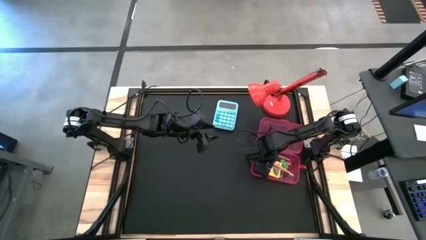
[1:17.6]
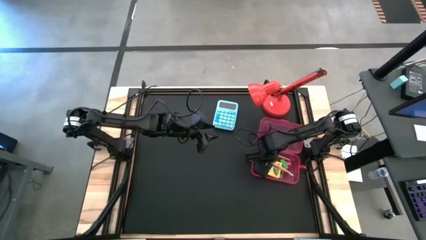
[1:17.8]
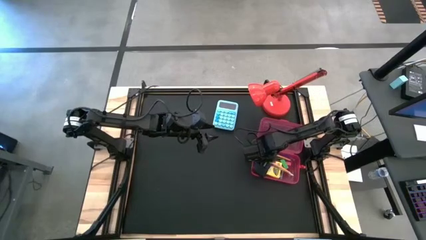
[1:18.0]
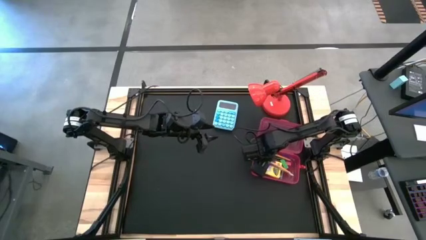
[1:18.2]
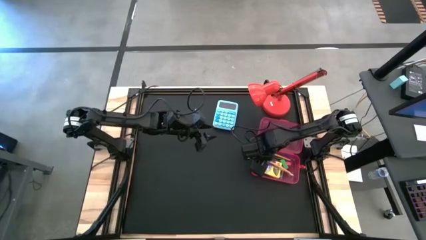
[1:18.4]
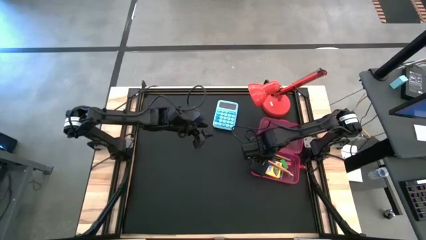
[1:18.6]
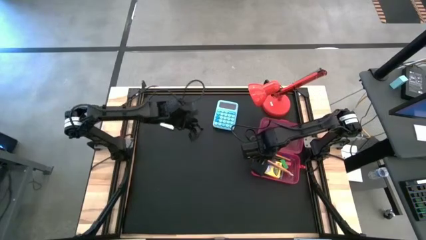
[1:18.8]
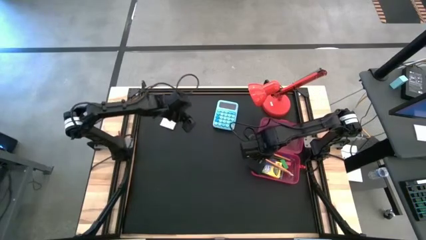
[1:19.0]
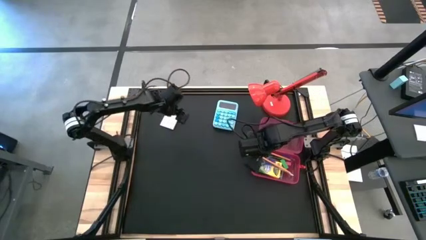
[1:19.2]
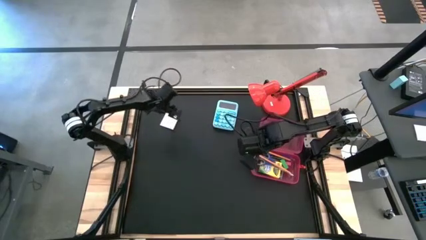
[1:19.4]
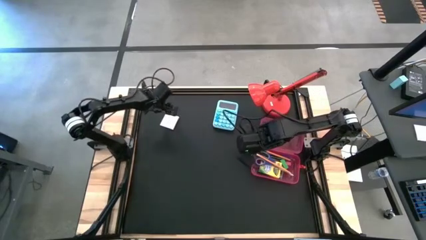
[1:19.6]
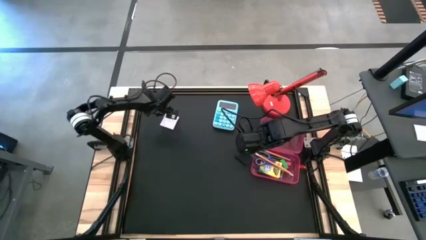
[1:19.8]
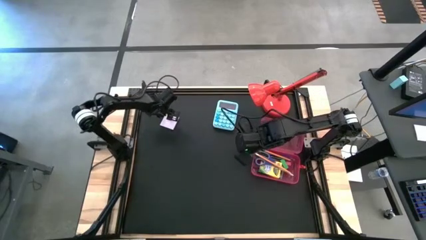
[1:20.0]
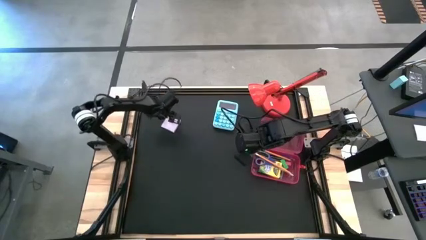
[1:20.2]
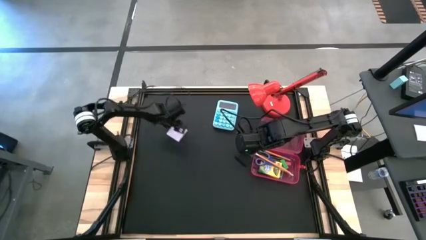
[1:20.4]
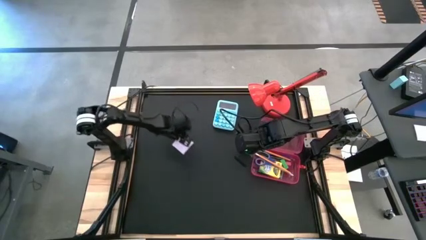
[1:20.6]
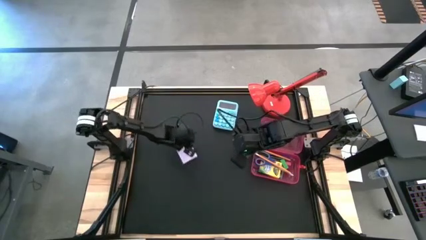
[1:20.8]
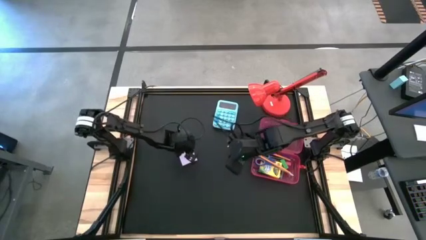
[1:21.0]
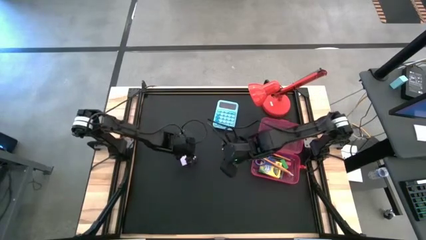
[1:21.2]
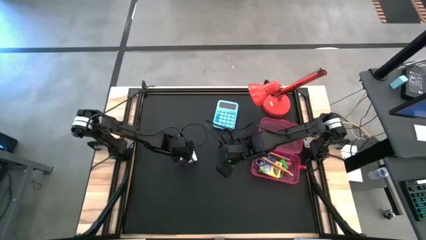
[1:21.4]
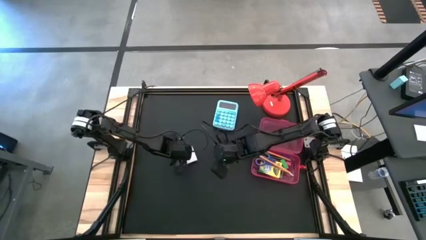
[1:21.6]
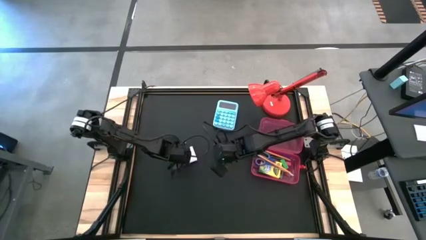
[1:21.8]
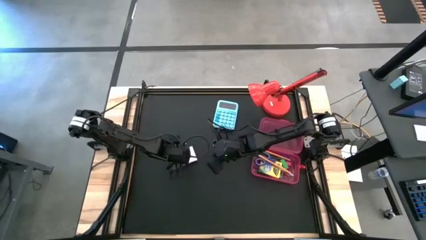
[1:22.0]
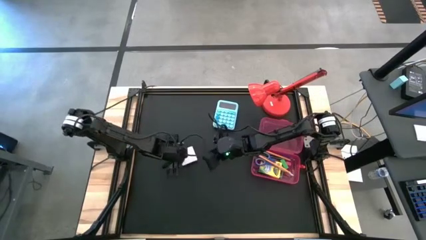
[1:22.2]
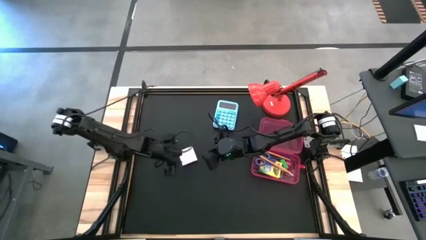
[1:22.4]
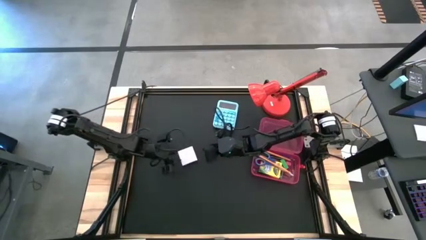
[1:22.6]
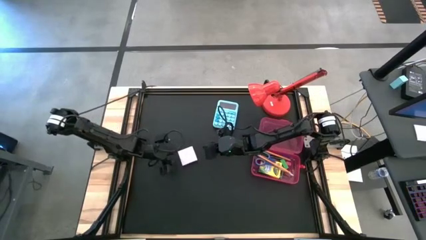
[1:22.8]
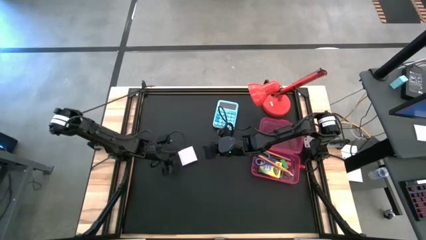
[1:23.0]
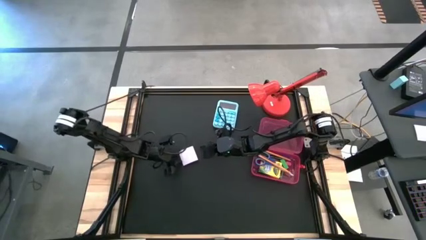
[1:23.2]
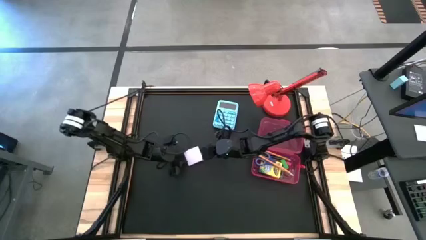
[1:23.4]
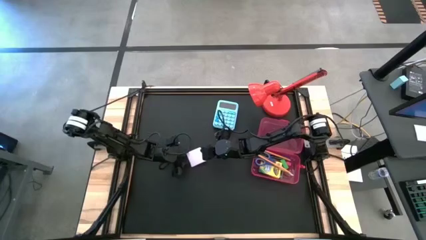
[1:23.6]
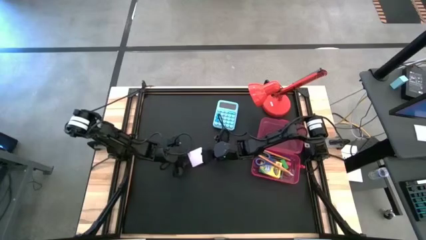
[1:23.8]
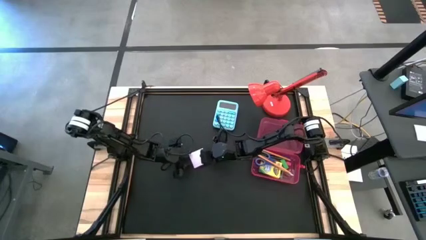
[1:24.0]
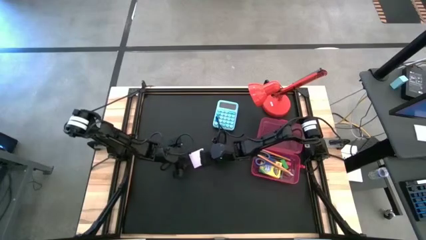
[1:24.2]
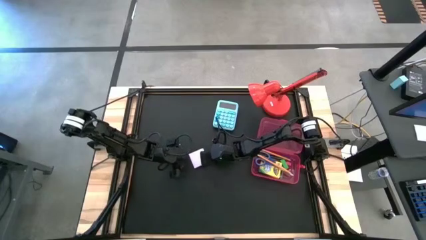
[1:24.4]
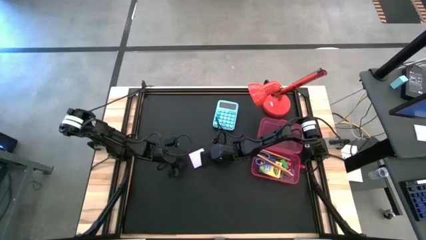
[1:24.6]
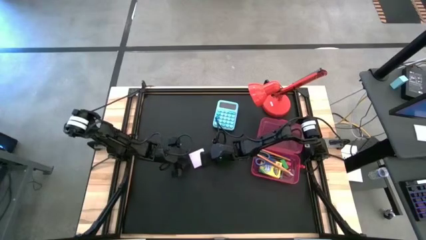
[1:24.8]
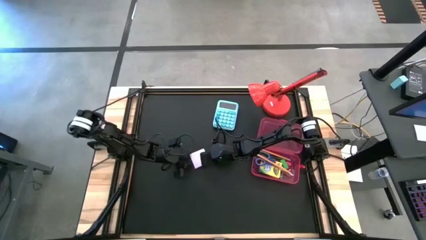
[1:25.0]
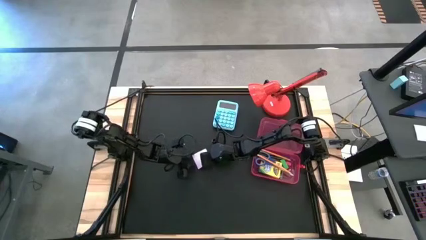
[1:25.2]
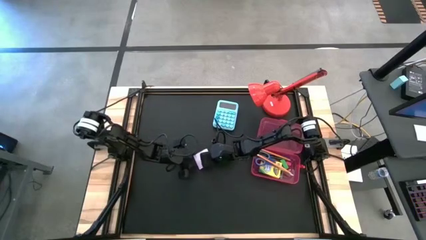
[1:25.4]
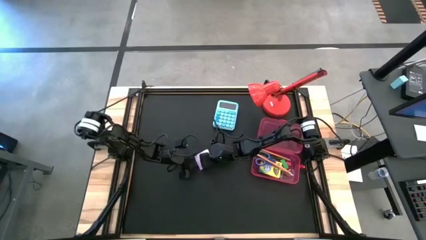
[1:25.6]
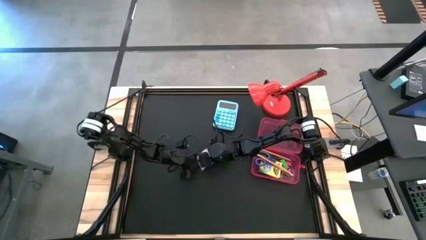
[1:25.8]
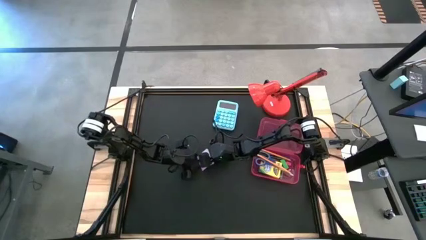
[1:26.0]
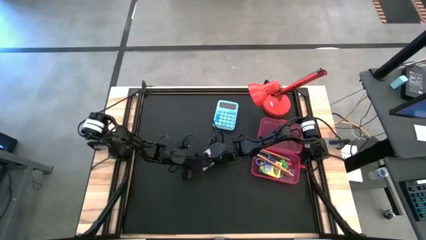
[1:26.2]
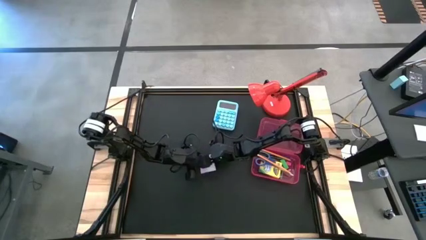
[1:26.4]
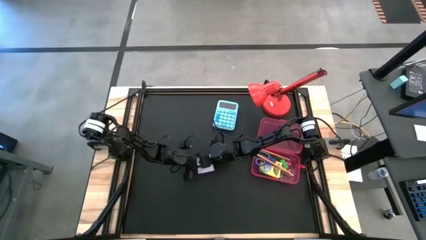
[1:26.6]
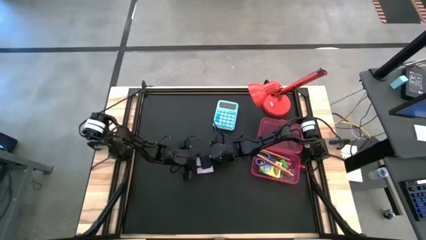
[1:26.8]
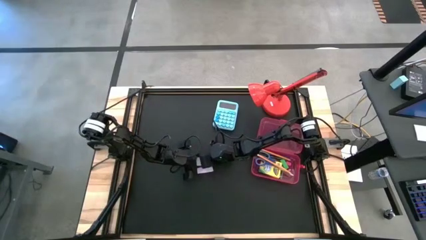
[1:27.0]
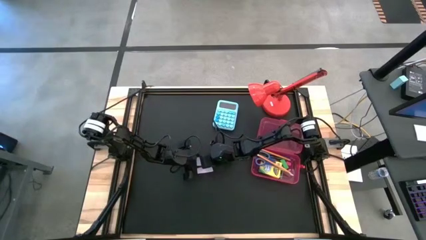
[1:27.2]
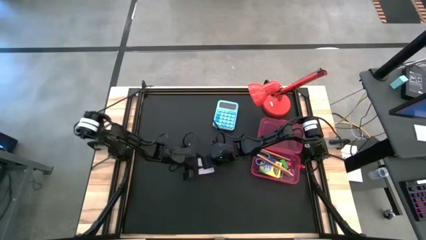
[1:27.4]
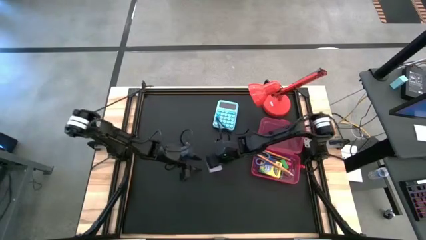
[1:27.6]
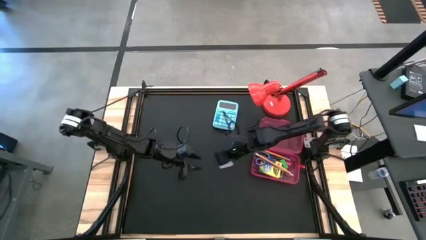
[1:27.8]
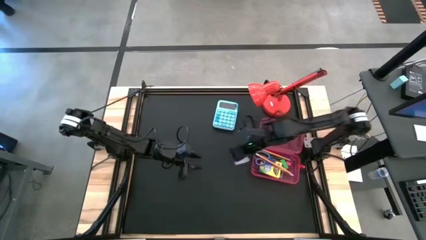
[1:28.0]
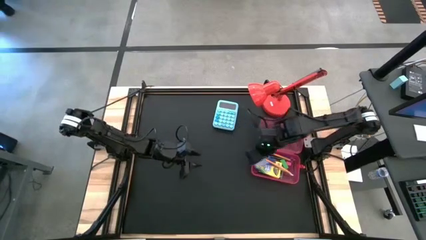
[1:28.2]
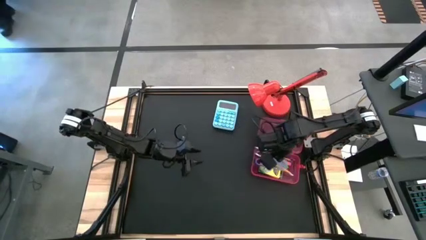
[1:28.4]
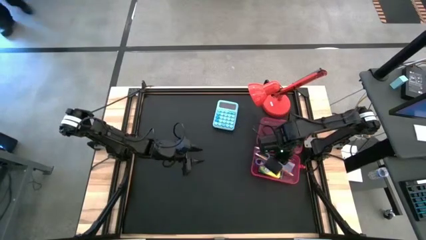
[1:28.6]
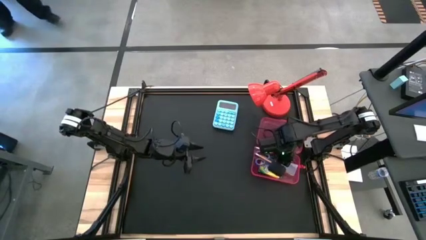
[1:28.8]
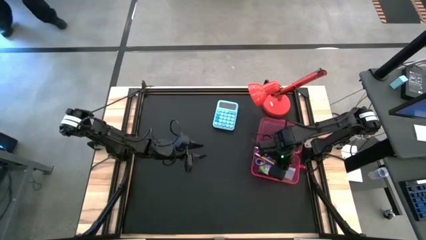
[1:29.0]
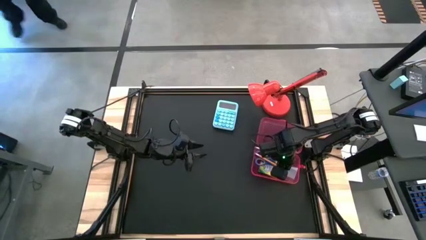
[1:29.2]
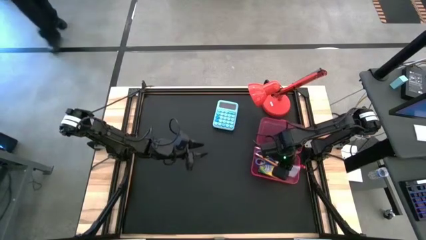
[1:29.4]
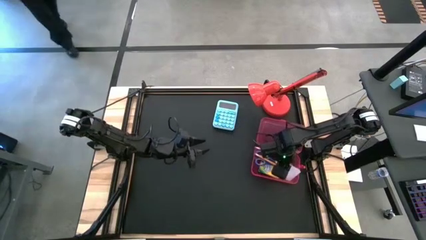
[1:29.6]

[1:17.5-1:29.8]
Task: Pack school essentials
Put the purple sticky notes into the red supply box
